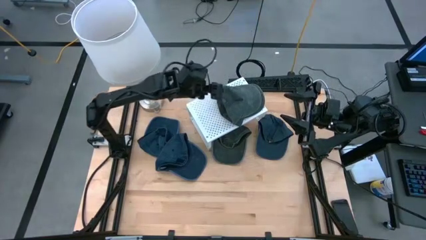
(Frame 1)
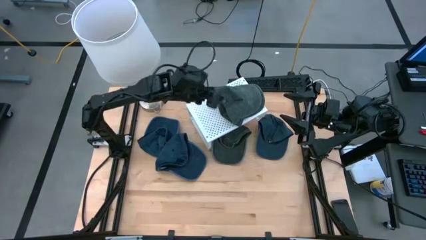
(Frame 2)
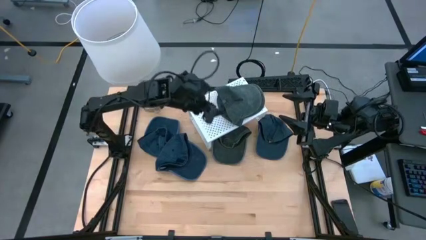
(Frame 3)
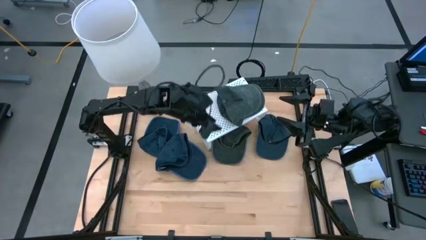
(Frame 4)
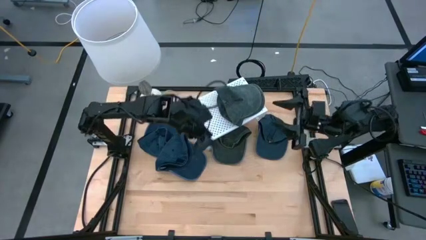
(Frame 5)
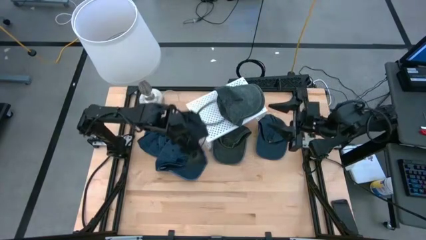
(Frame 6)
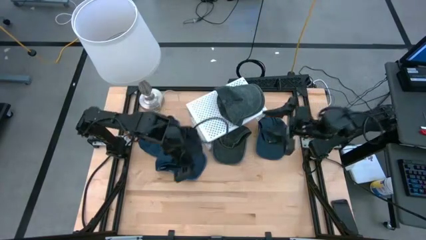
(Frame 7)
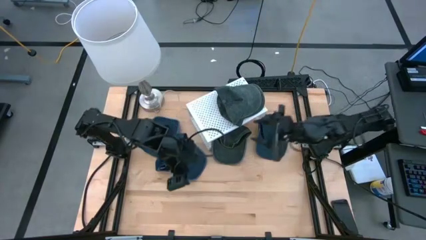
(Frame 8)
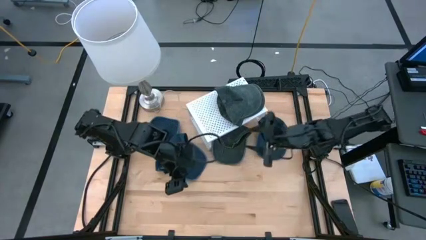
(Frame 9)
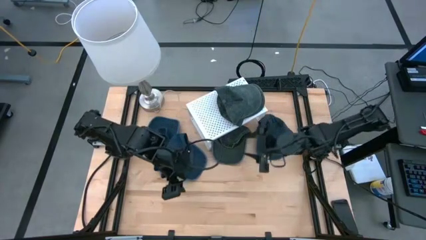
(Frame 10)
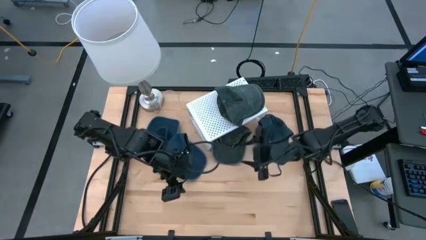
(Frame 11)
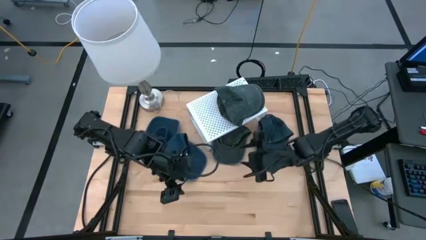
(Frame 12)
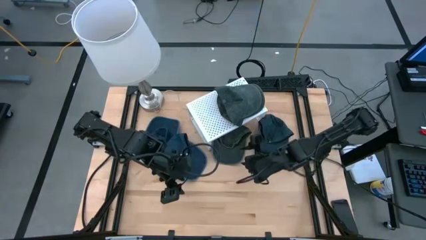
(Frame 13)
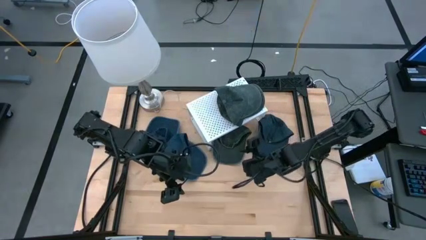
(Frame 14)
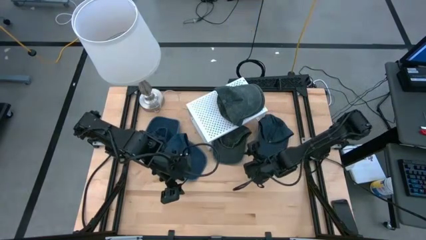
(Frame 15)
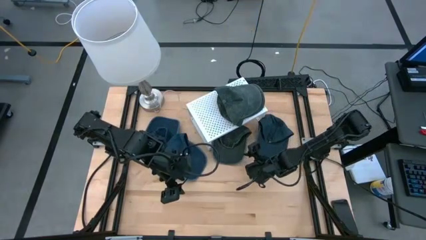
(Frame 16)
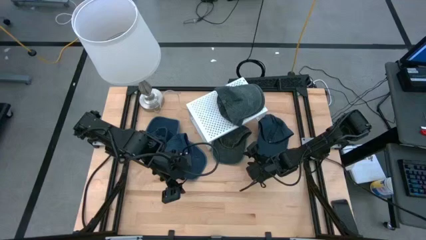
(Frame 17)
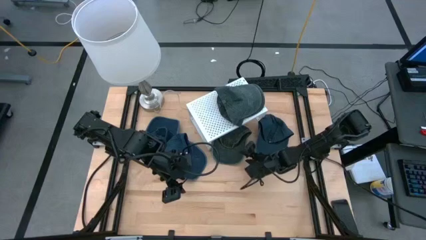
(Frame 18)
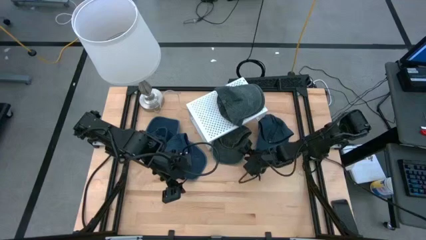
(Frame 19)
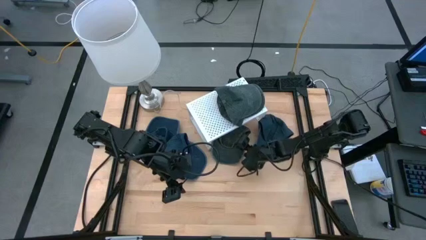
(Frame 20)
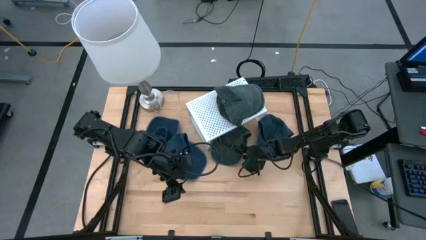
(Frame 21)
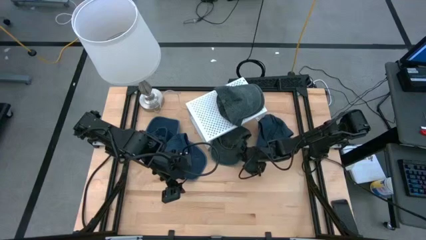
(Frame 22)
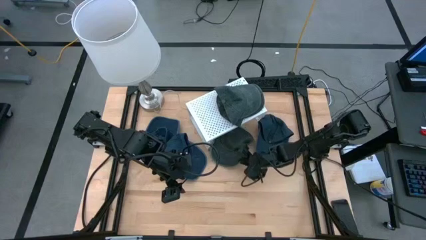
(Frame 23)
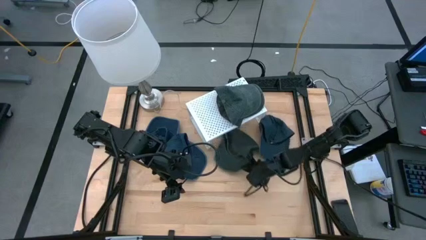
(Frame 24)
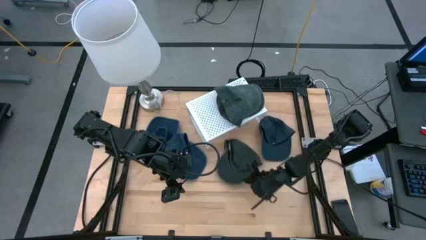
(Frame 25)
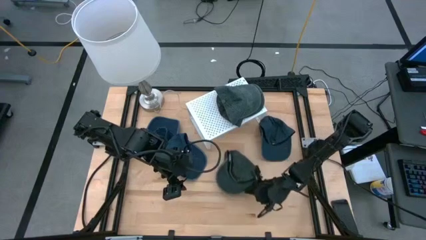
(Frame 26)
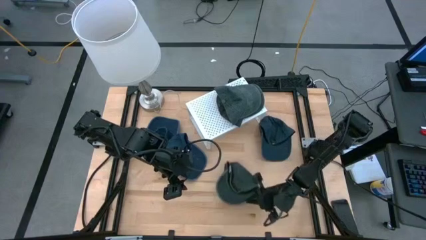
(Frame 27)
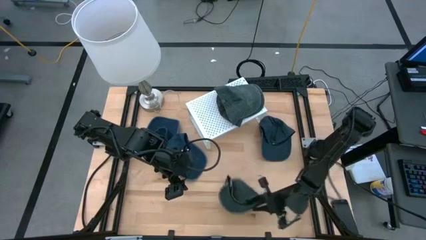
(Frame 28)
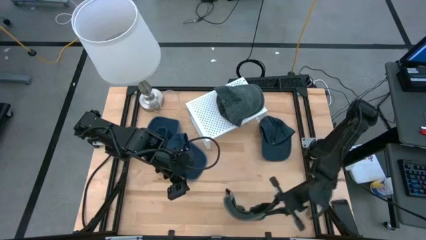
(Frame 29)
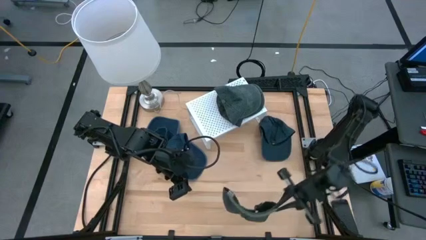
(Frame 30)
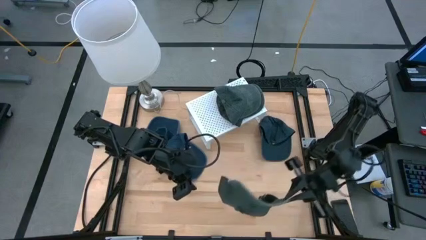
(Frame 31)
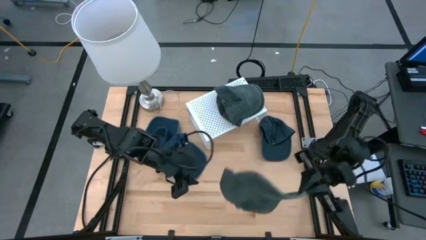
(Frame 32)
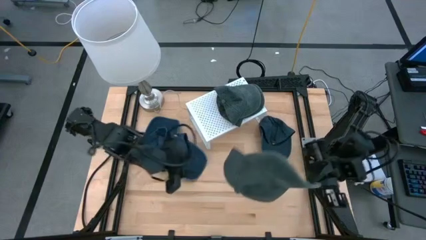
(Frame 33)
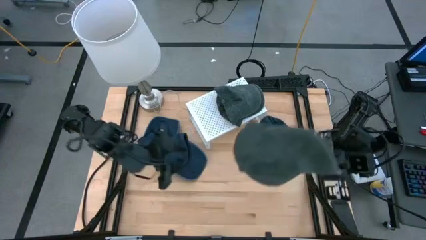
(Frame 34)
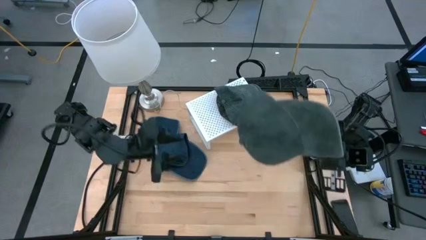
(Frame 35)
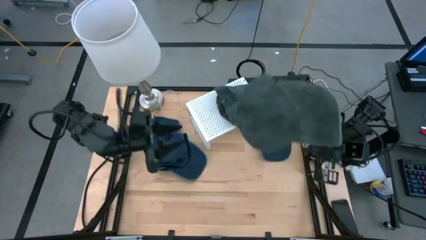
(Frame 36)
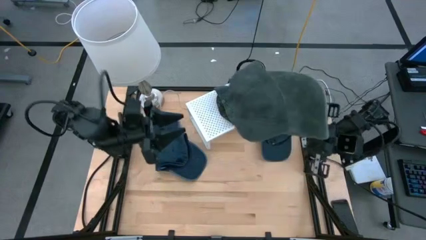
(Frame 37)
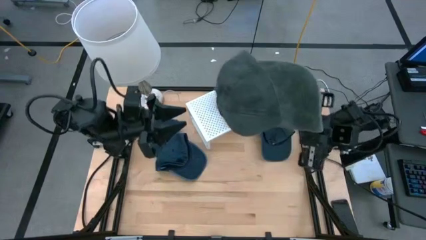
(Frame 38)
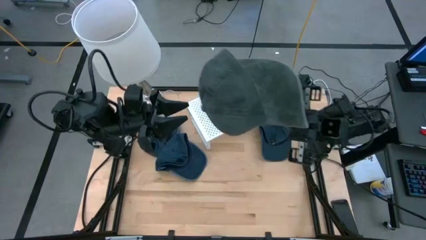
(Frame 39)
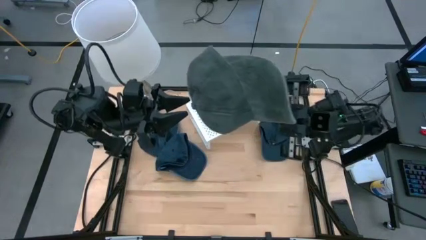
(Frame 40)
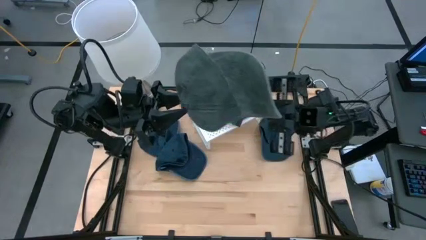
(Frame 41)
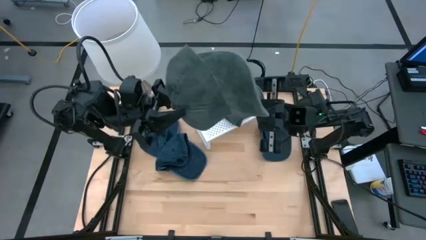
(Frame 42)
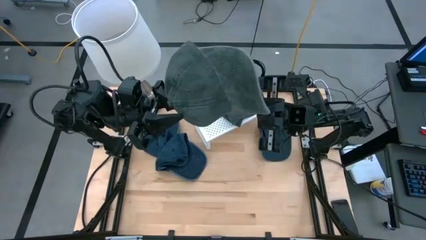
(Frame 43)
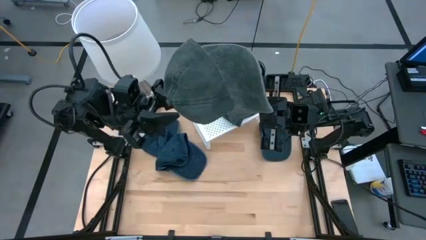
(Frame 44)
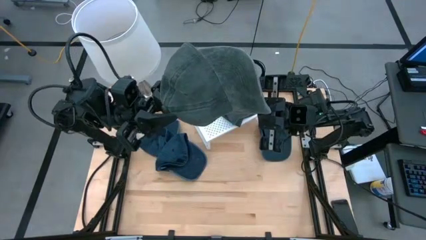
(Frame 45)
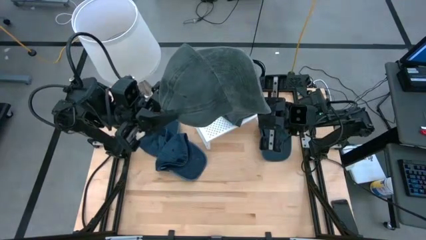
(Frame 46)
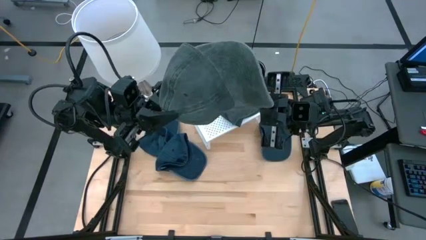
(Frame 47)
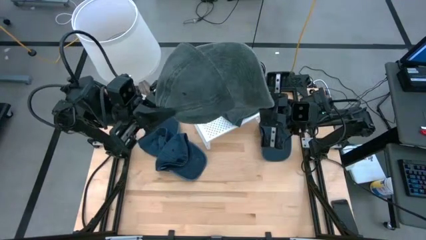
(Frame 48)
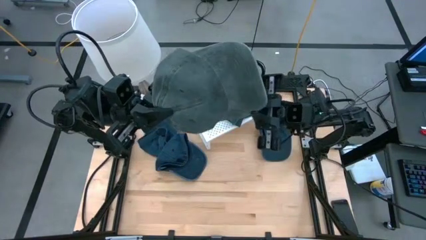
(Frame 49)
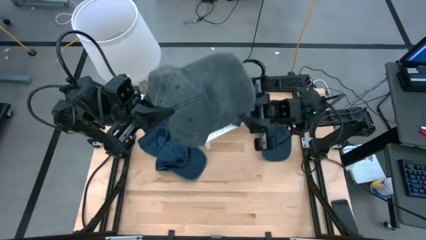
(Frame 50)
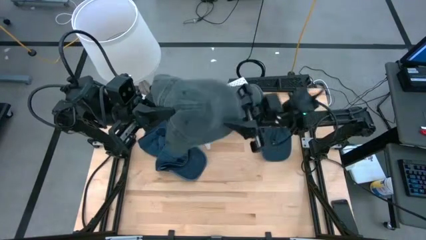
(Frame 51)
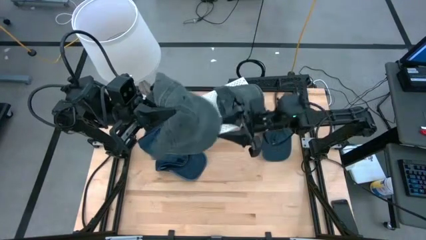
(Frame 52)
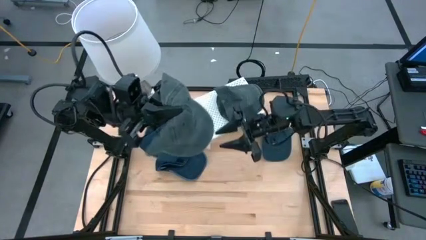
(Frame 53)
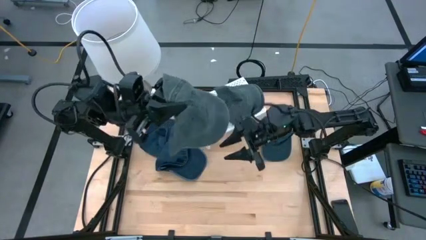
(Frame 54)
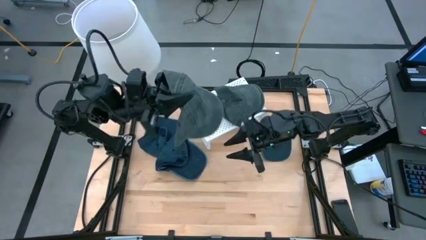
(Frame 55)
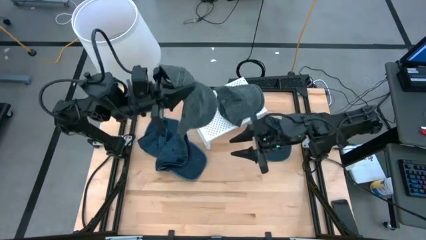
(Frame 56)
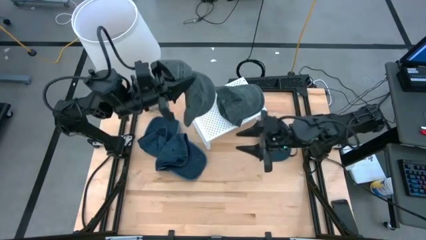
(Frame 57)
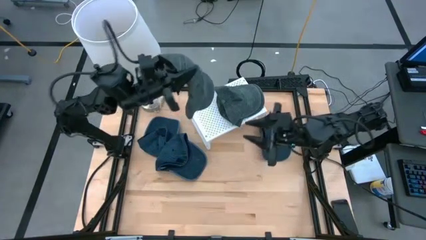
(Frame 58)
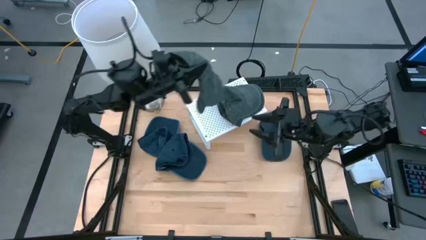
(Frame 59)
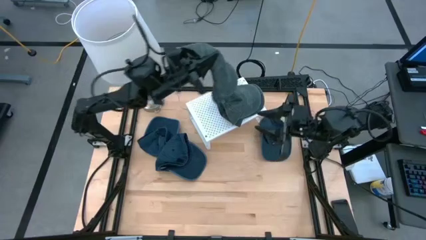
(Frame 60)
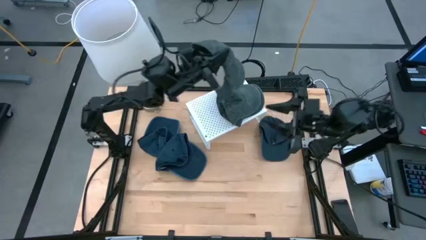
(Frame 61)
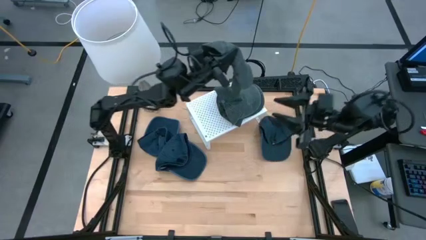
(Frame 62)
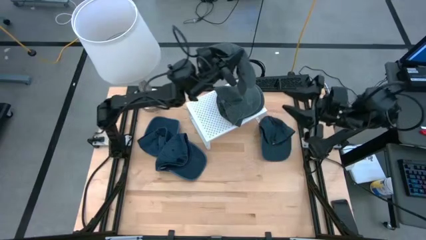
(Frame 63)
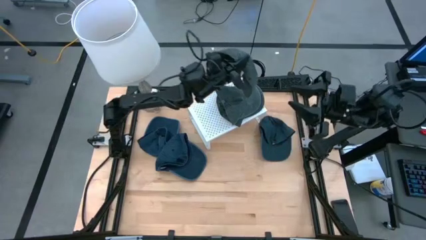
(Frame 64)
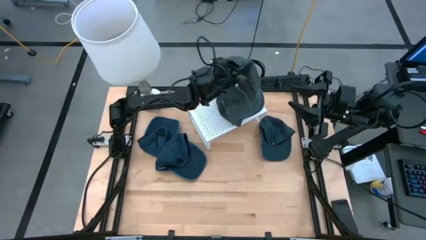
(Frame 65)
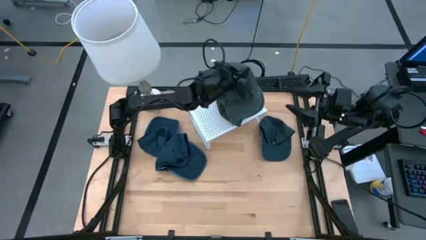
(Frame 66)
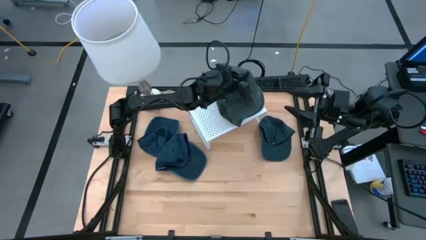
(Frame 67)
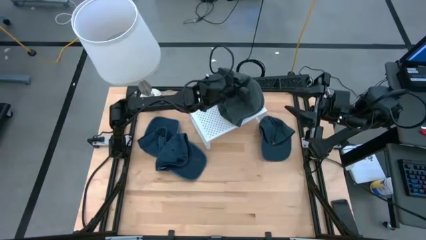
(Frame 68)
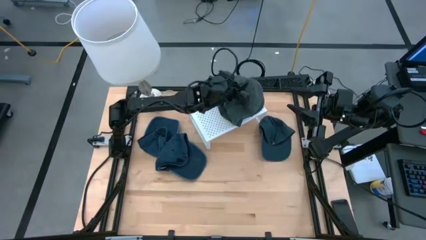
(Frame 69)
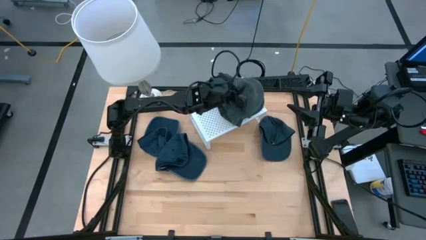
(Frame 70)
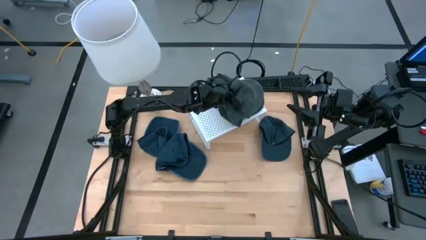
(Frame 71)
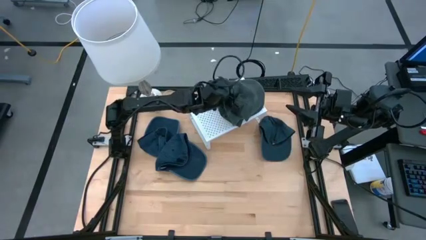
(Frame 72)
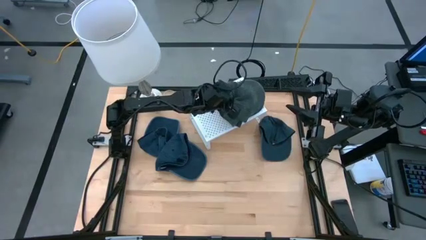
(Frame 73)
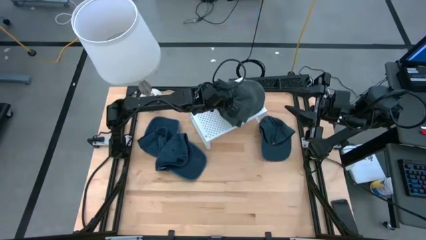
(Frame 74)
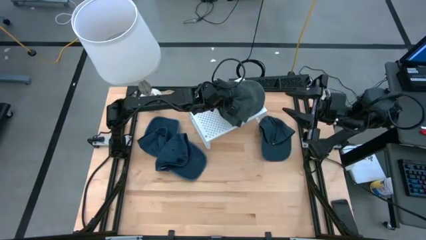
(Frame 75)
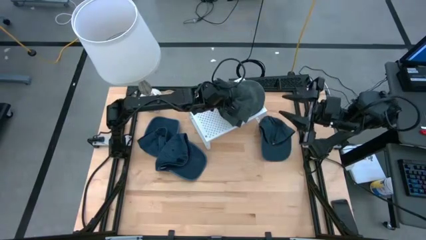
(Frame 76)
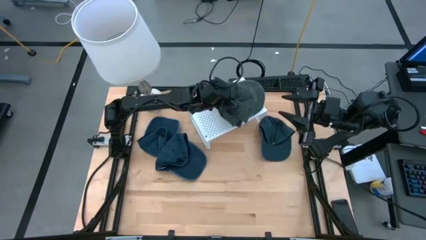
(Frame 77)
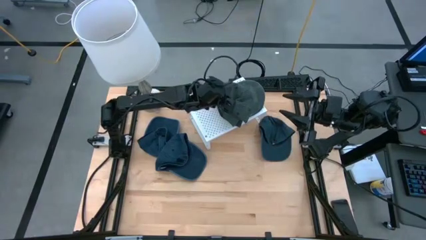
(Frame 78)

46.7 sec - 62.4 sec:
Task: Pick & Place hat
Stack the green cap on top of the other green caps on the shelf
